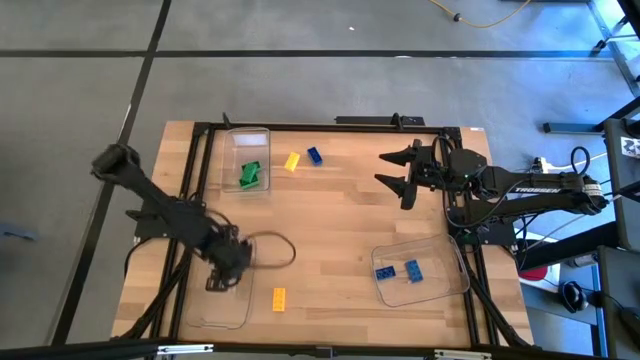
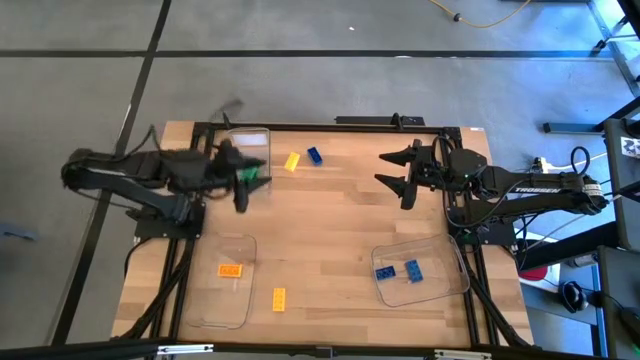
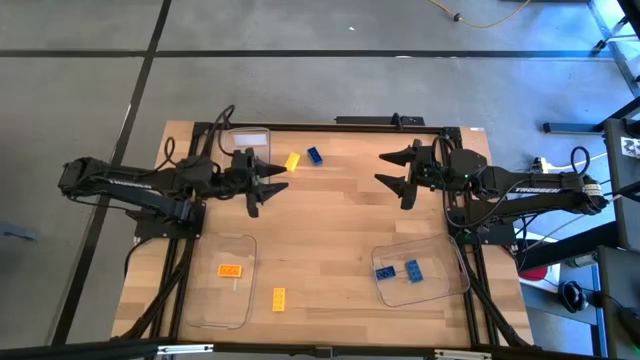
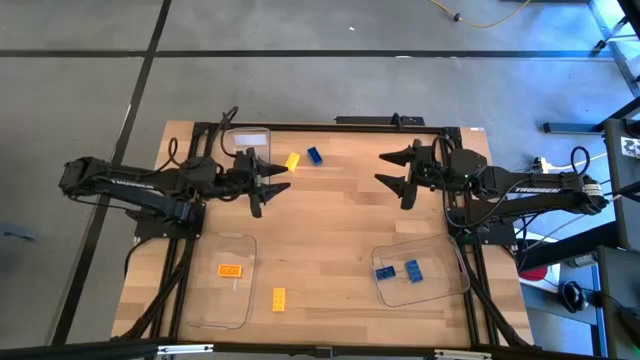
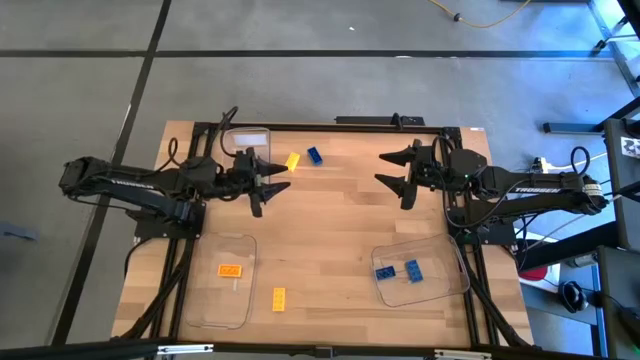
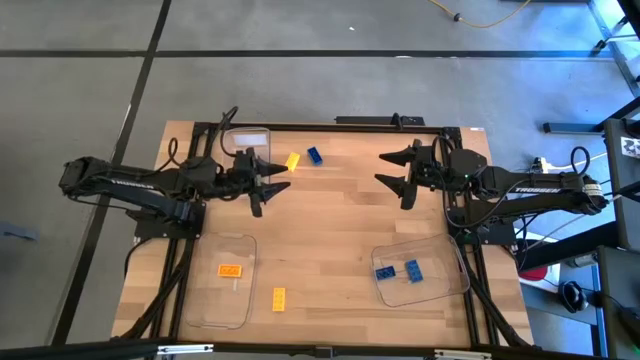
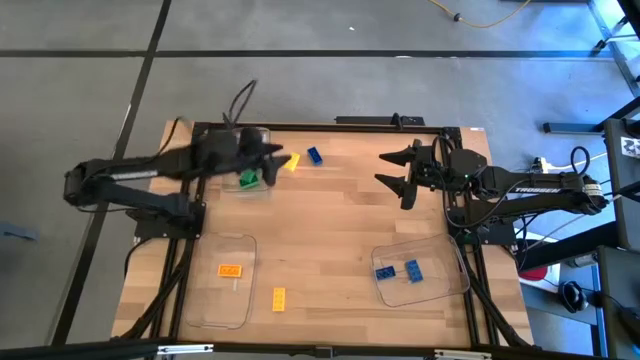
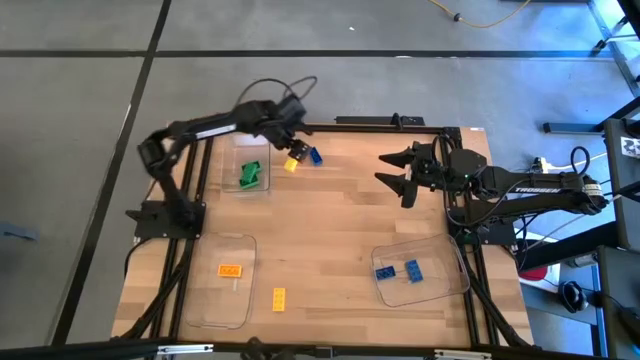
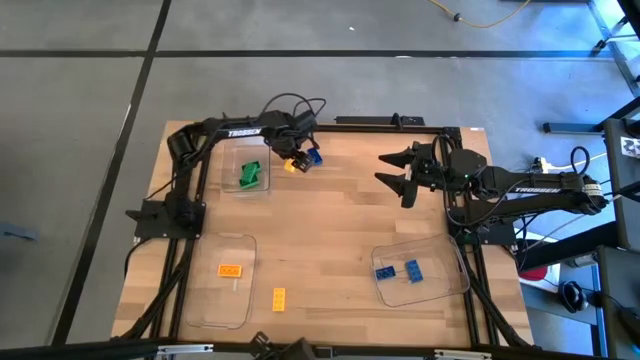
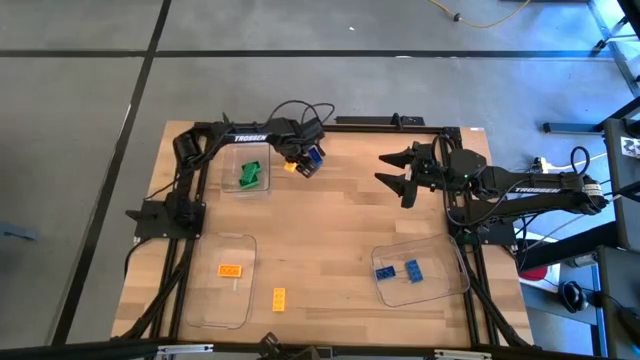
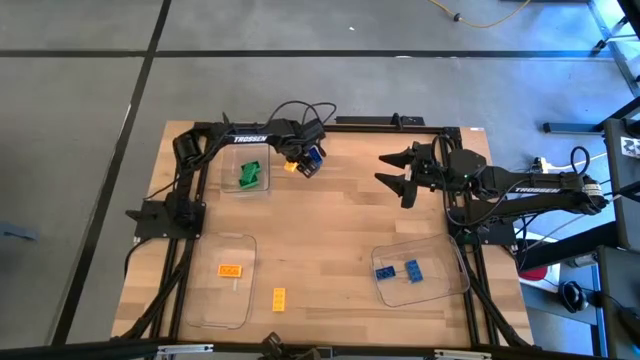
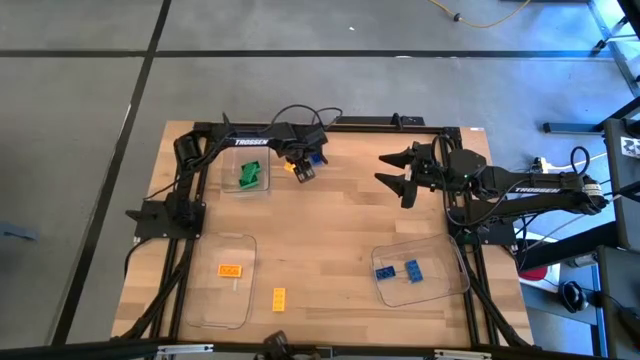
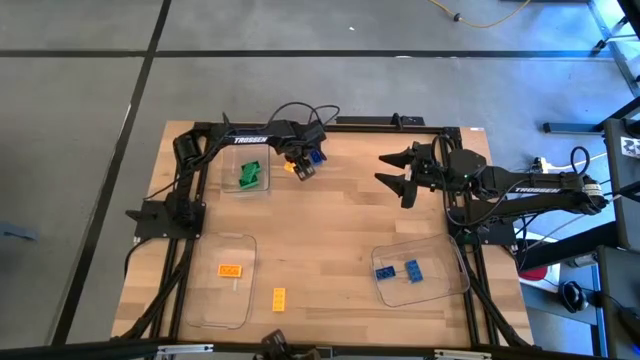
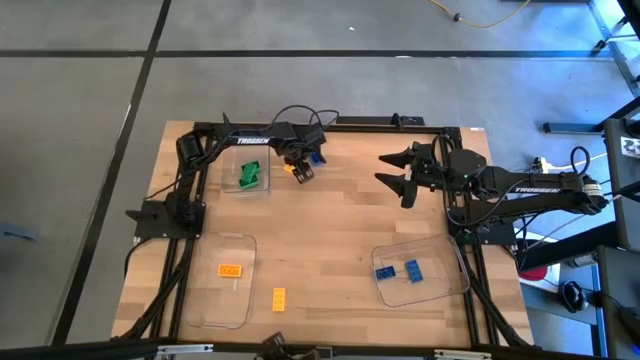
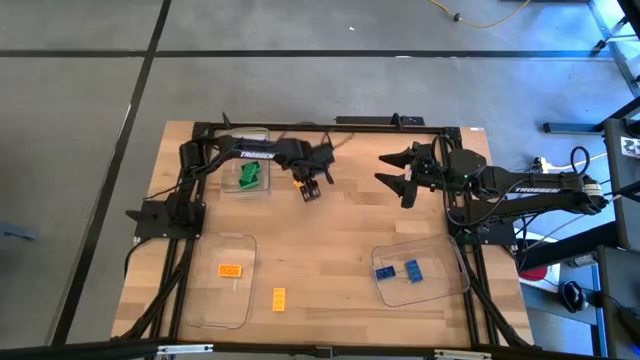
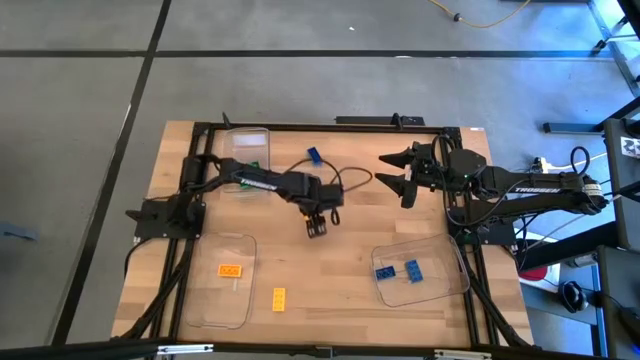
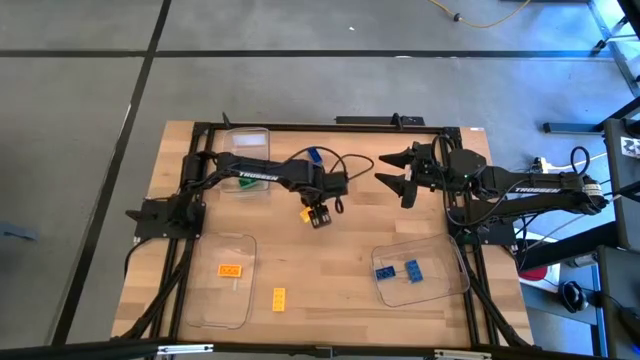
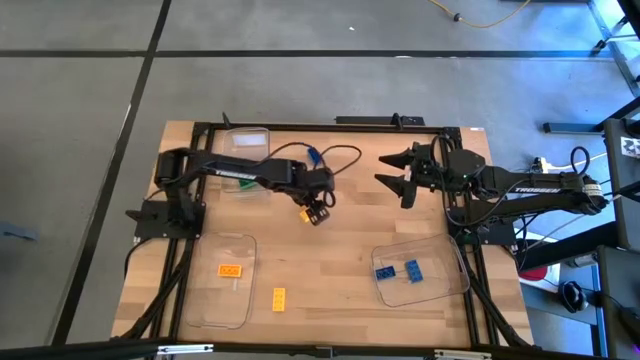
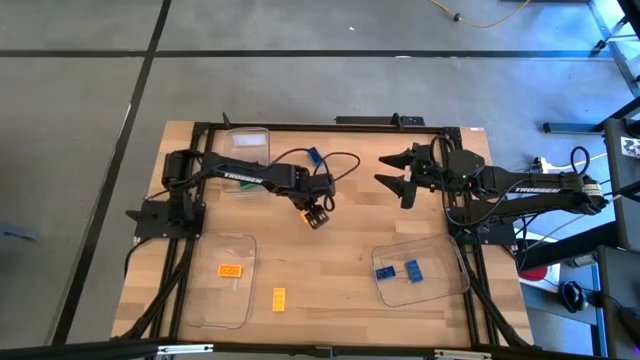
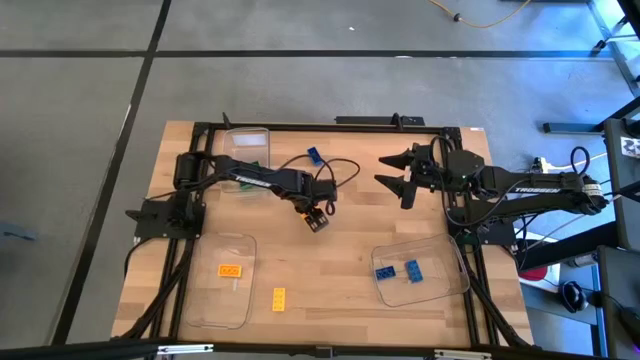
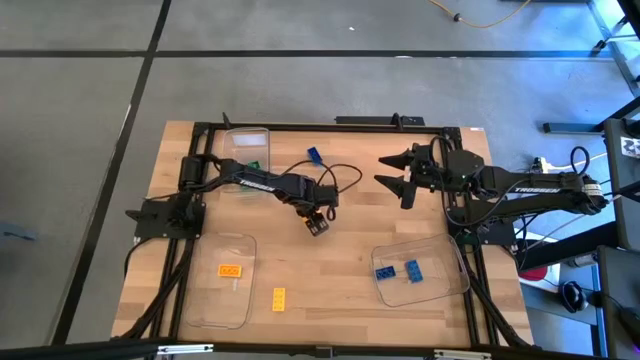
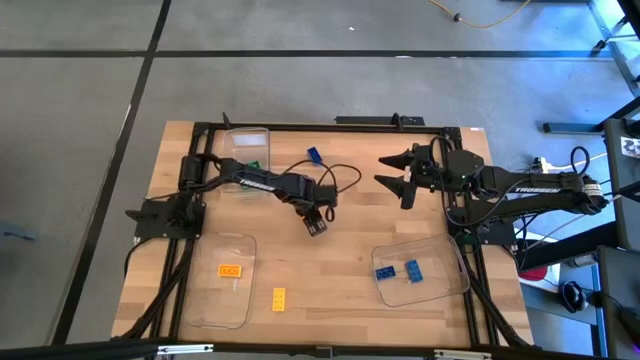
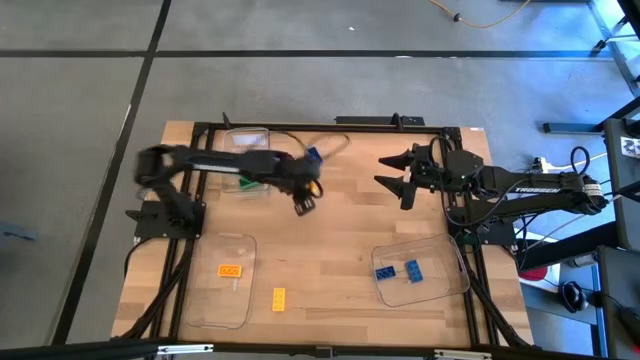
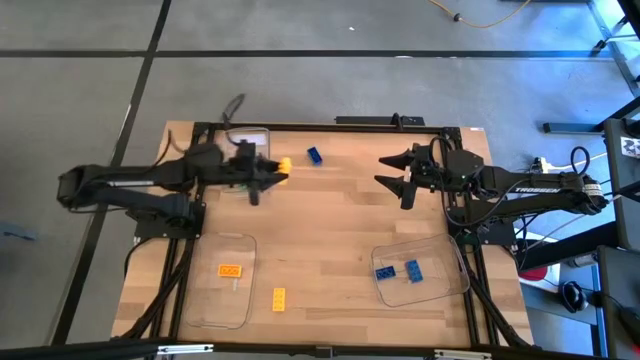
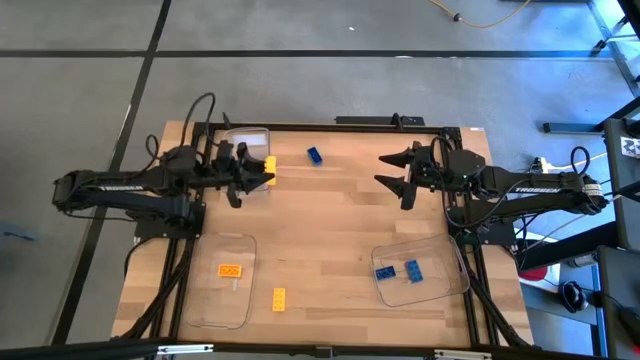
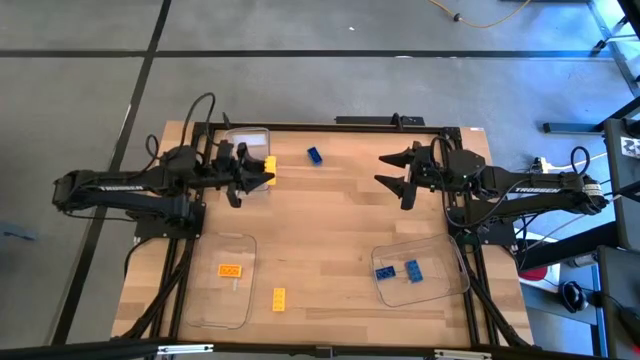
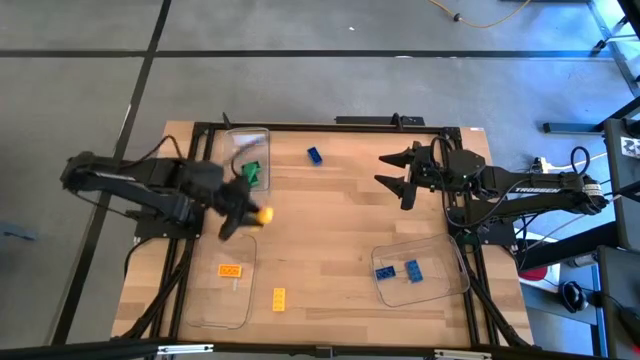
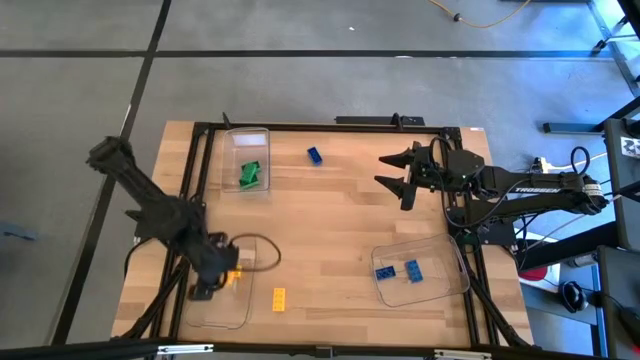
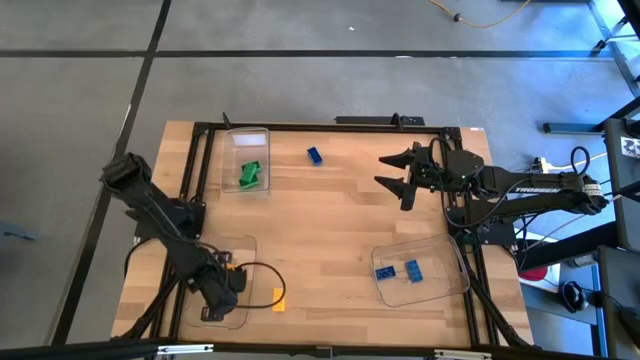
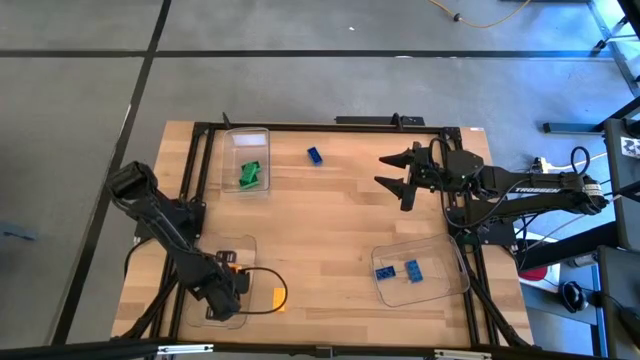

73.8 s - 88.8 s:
Task: Sort & place blocks by color
Put the top yellow game piece into the bottom left transparent bin

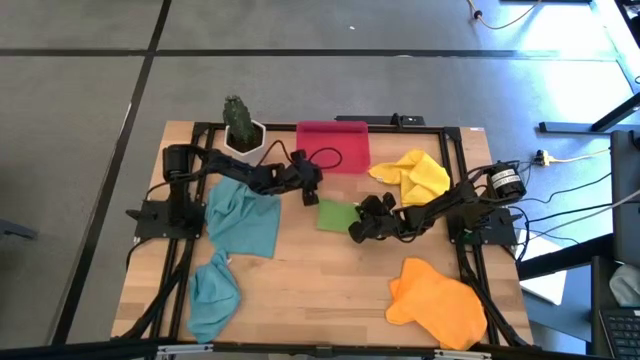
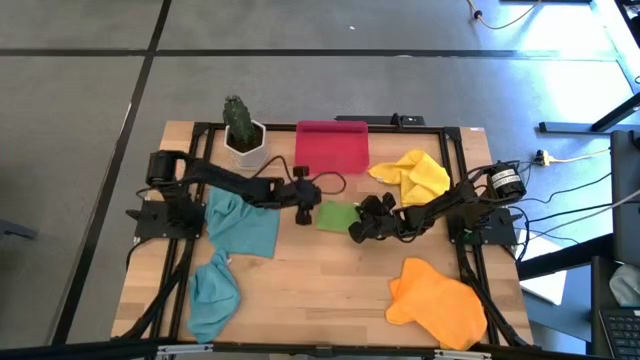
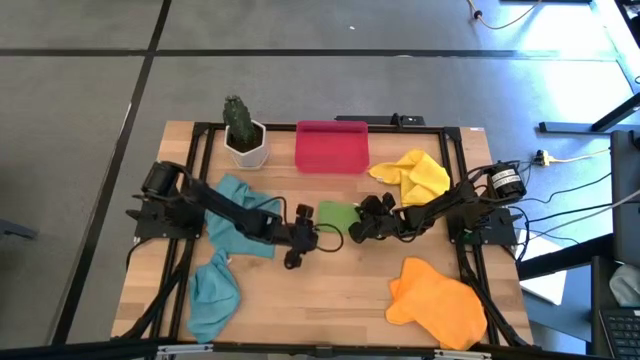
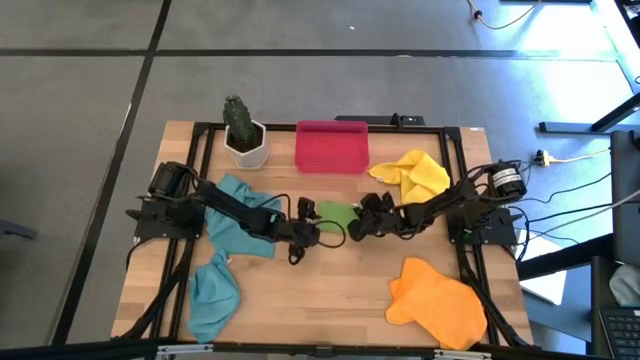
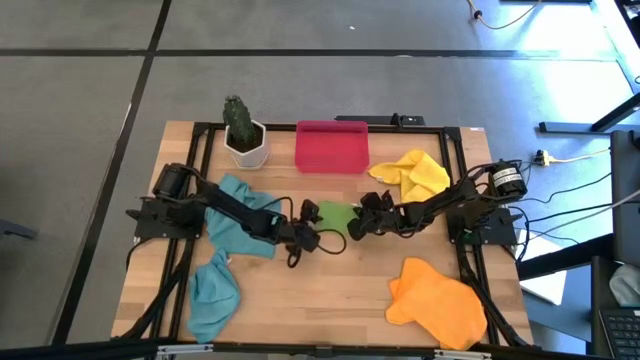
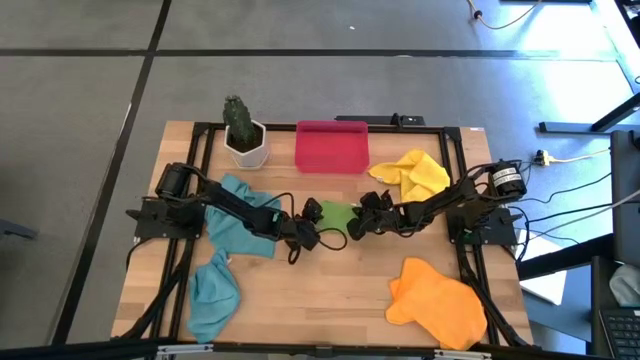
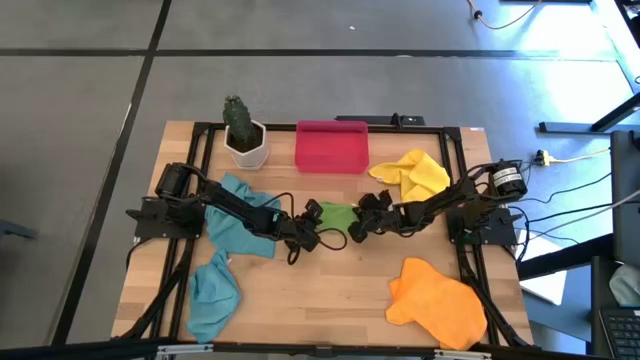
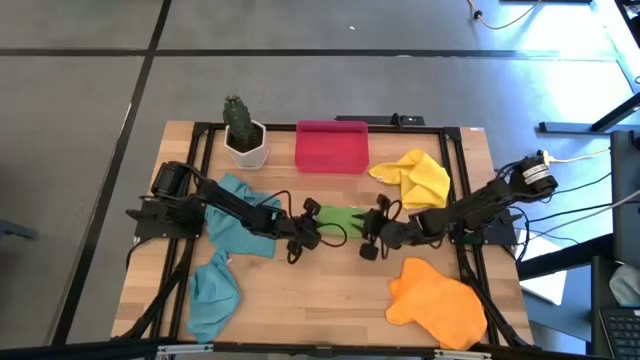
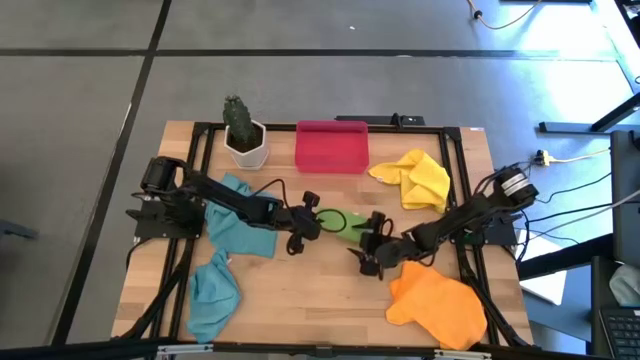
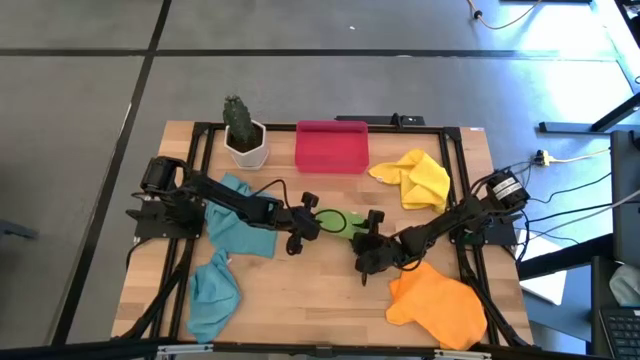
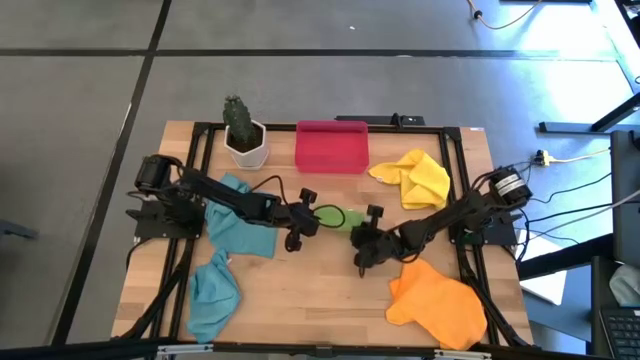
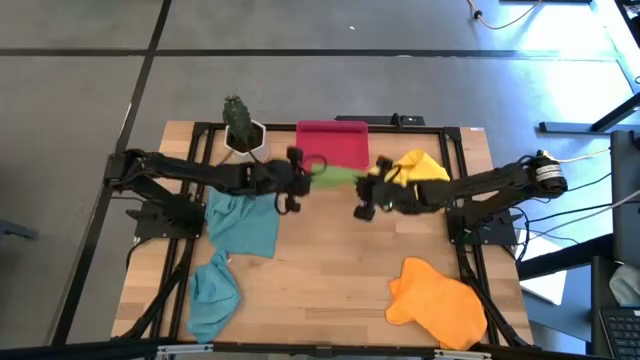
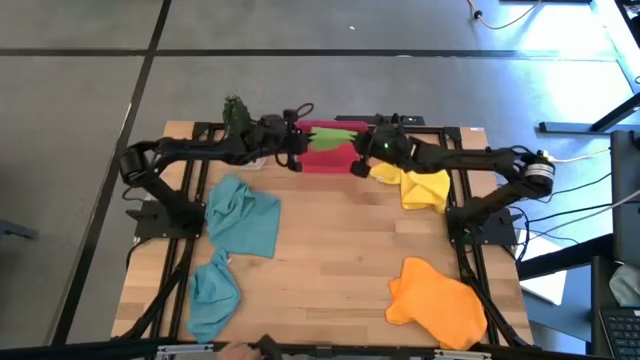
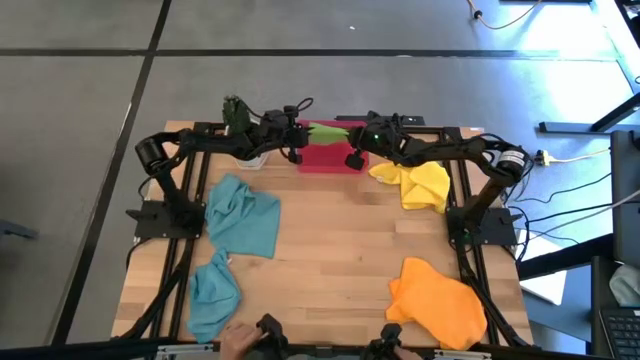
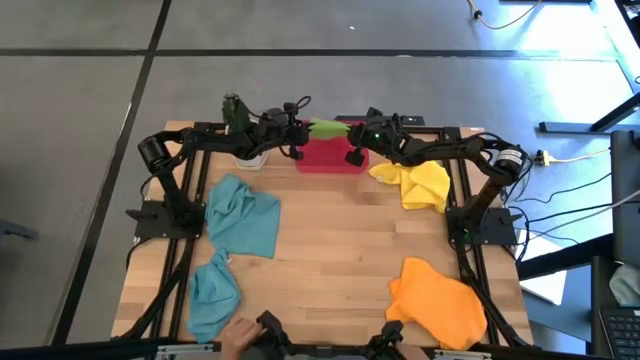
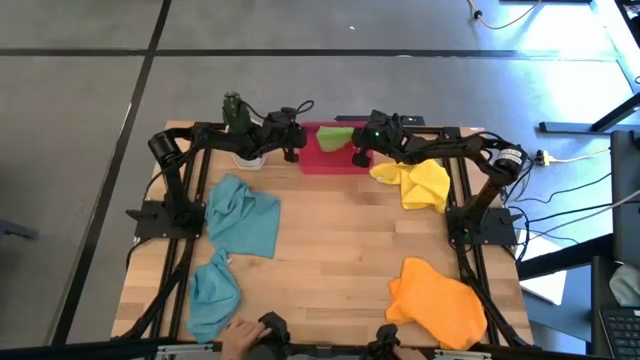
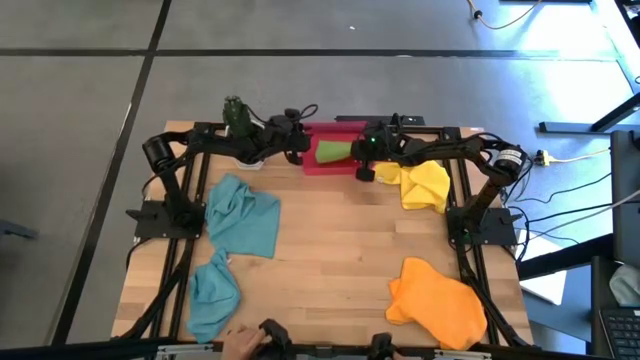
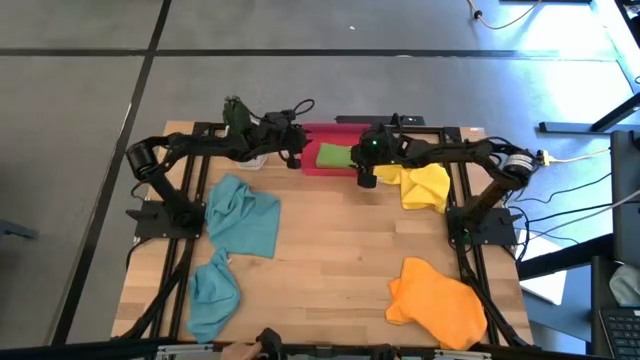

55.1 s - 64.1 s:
Task: Fold microfiber towels
Put the green microfiber cloth into the red bin
